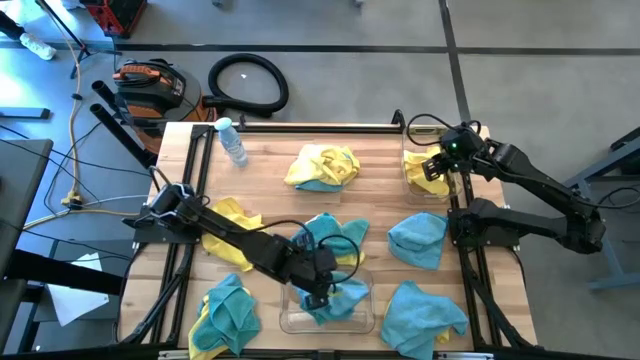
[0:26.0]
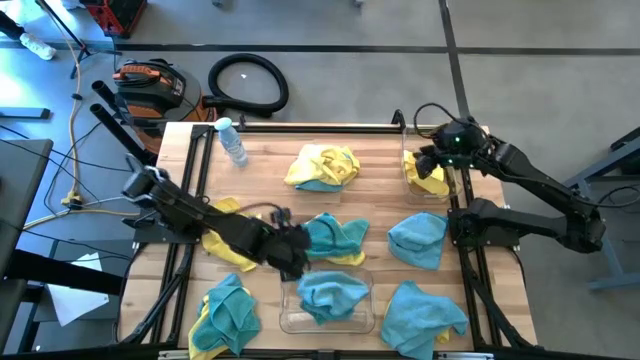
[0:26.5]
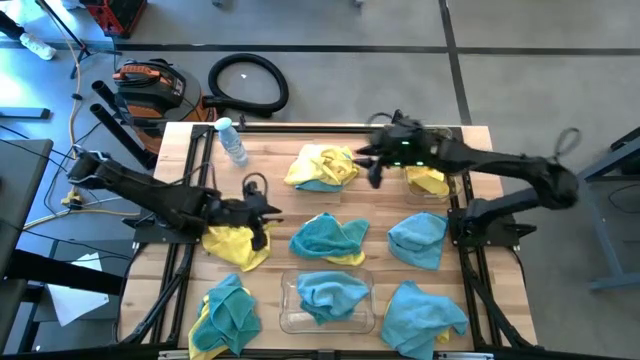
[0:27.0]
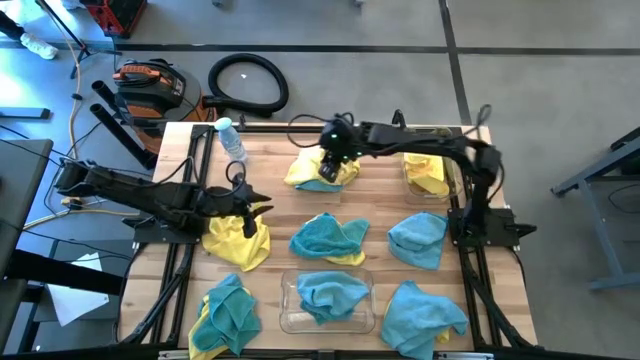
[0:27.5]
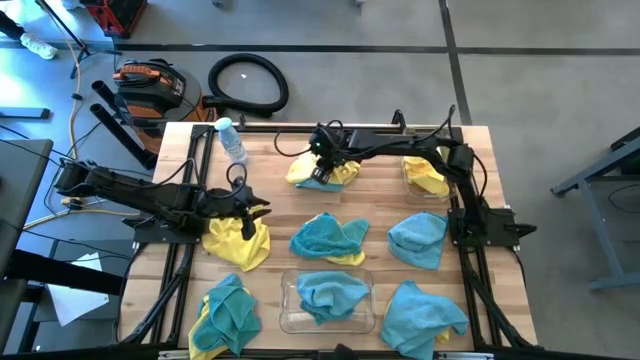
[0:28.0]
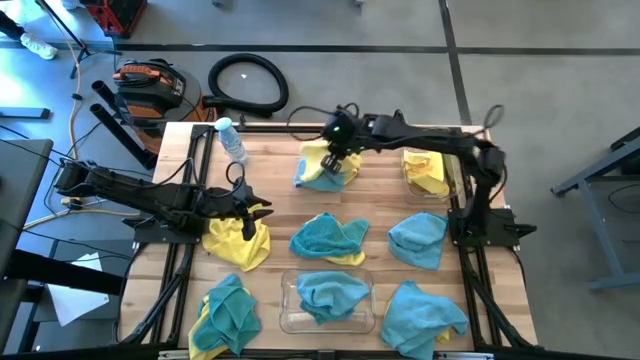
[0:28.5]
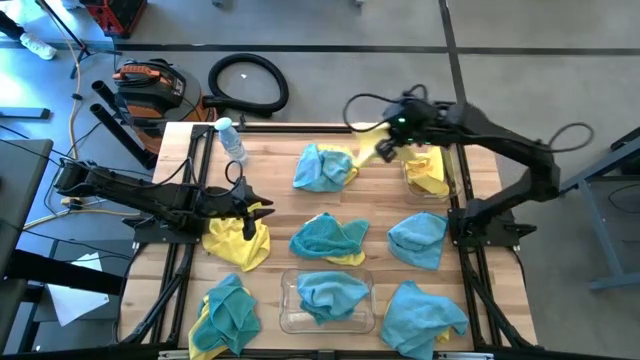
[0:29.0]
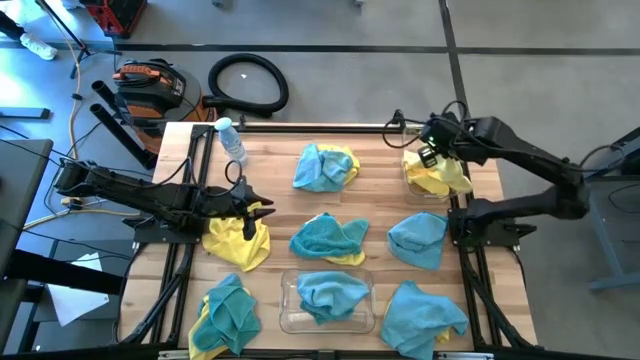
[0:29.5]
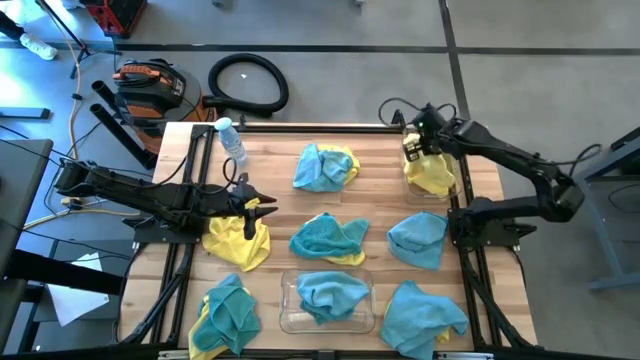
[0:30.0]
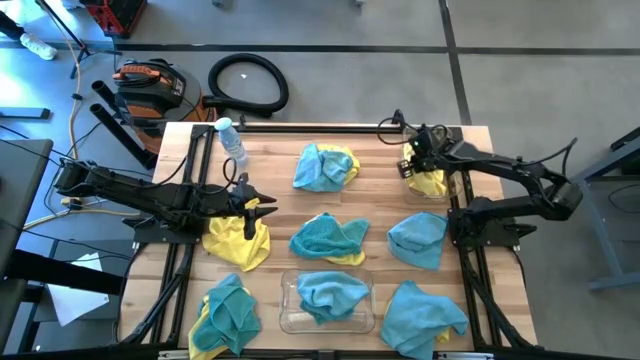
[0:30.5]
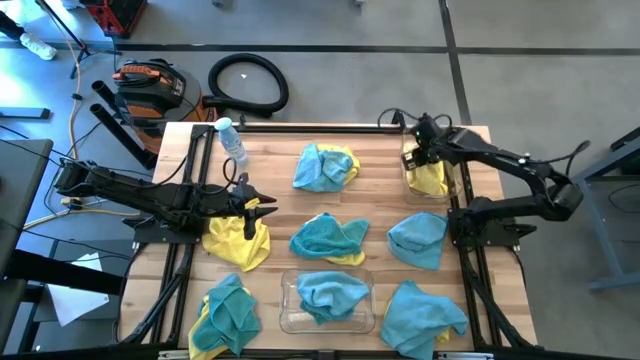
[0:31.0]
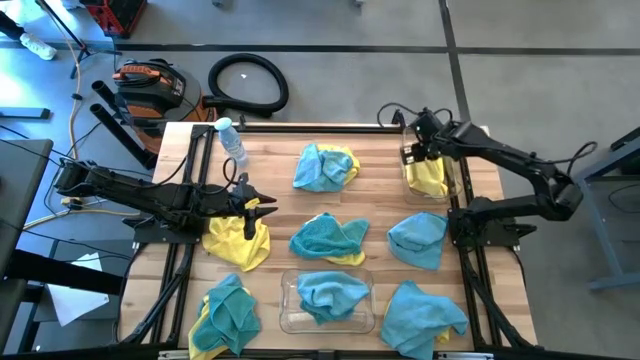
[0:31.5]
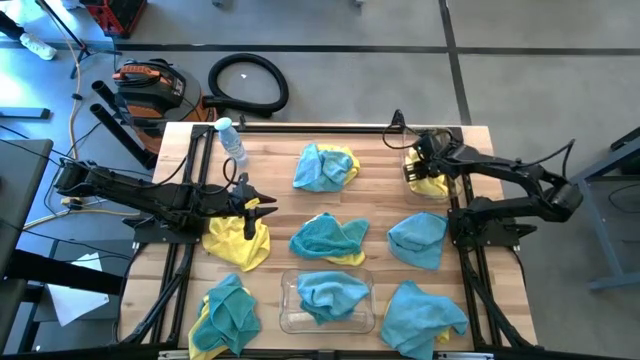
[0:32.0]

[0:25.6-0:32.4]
Task: Sort microfiber towel by color & place in baskets
Put the yellow microfiber towel into the top transparent bin

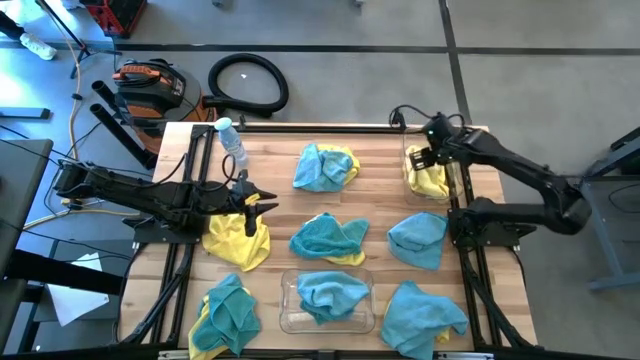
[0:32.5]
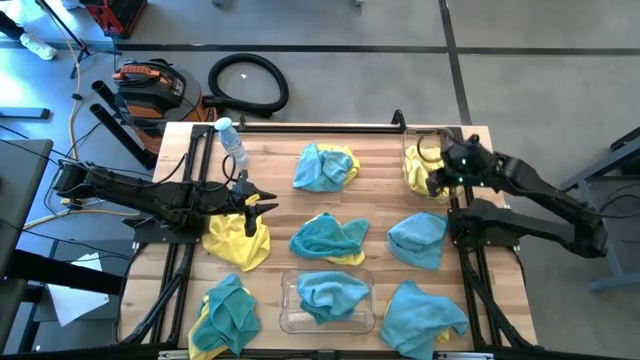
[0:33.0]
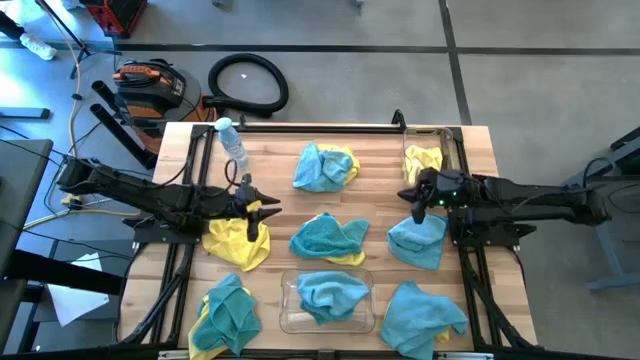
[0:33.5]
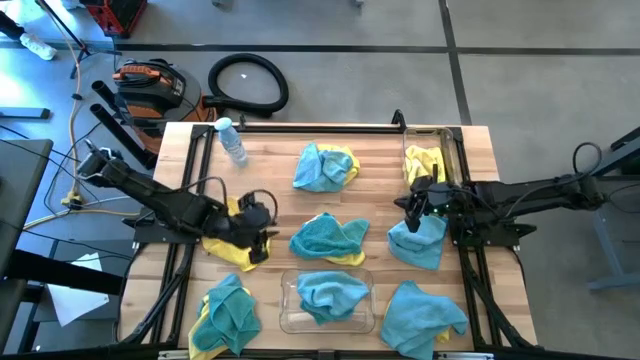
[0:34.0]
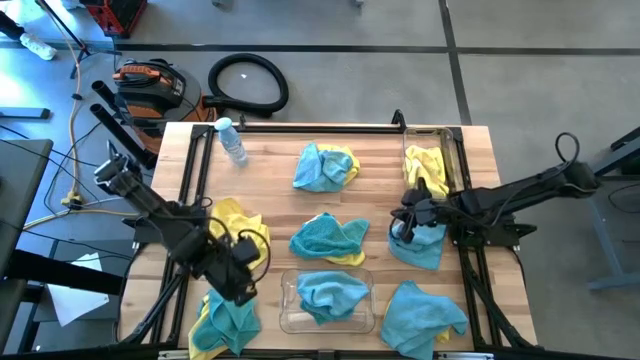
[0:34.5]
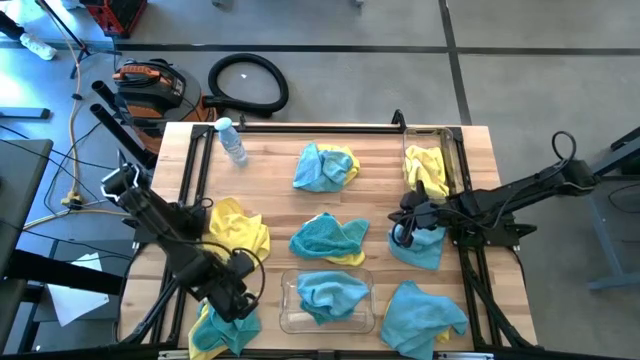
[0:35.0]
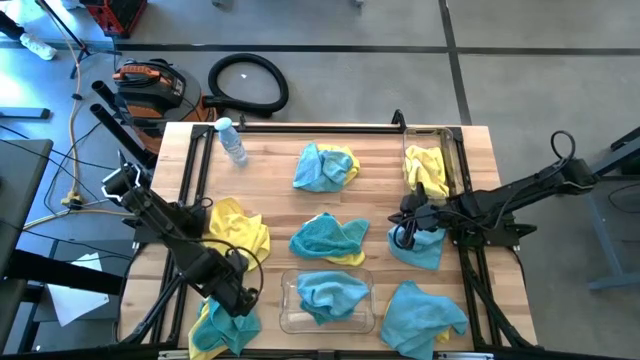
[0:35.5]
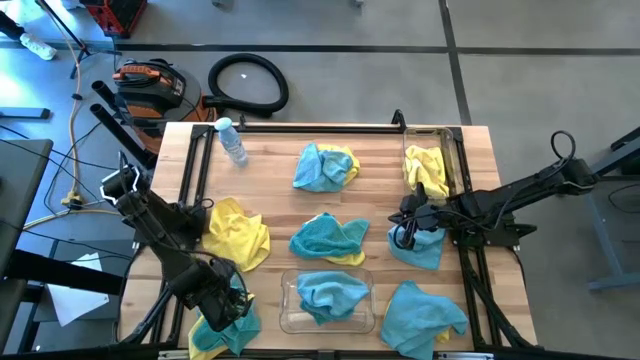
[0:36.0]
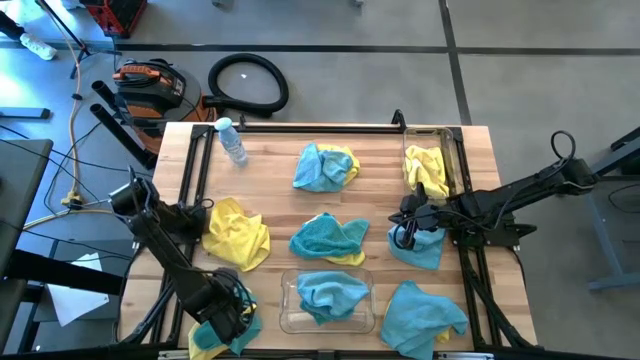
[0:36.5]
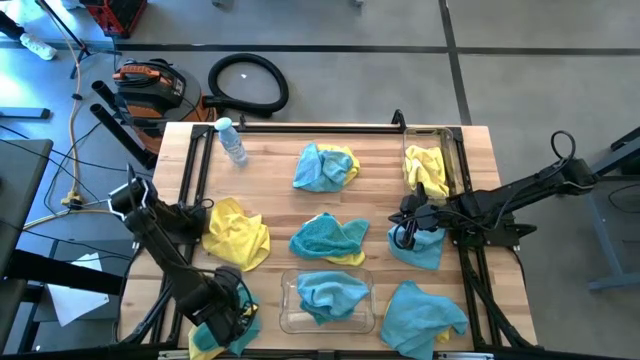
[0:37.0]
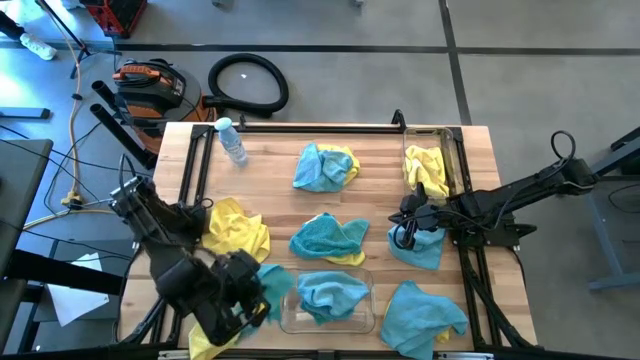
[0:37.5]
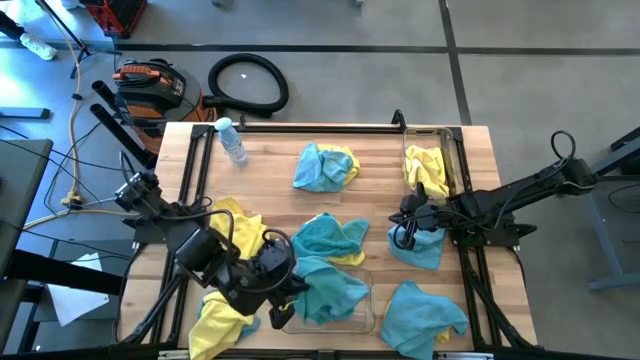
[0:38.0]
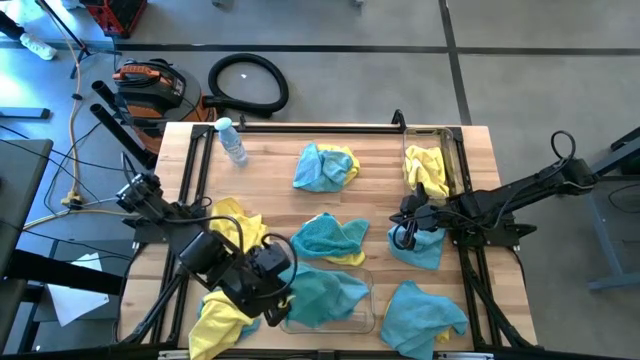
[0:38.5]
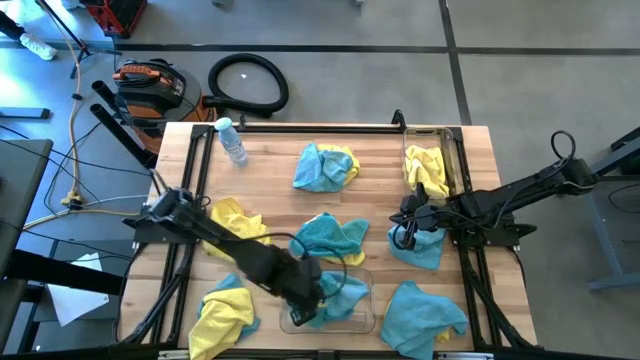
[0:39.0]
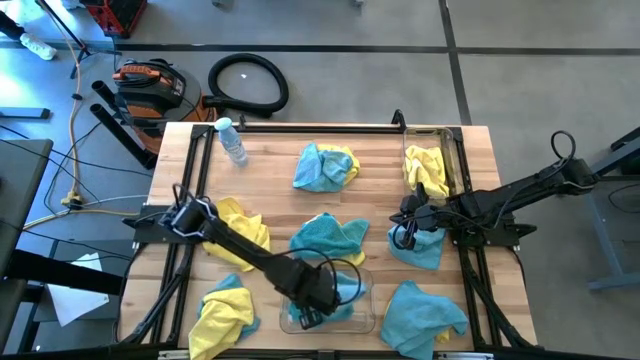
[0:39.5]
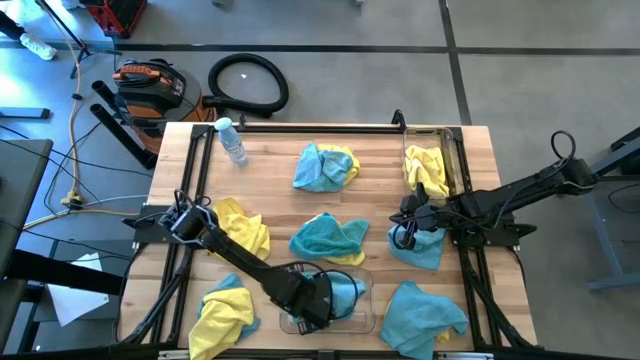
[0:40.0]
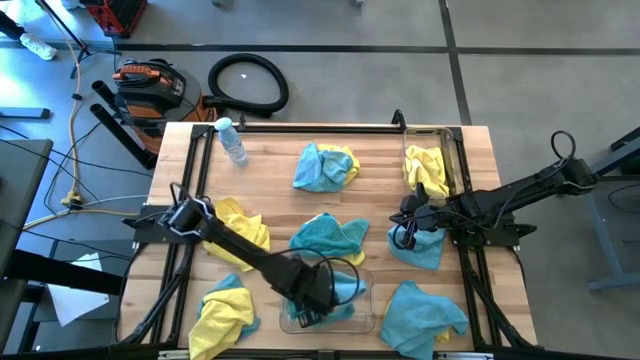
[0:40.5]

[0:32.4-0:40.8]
Put the blue microfiber towel into the bottom transparent bin

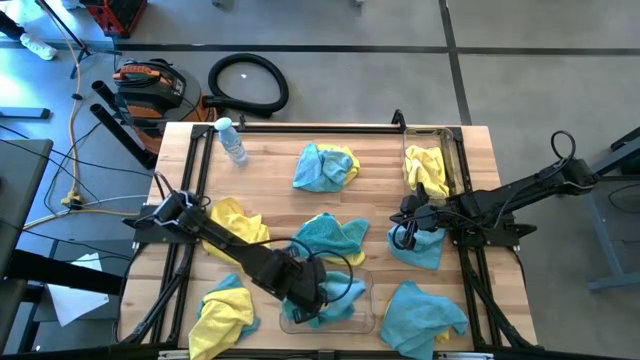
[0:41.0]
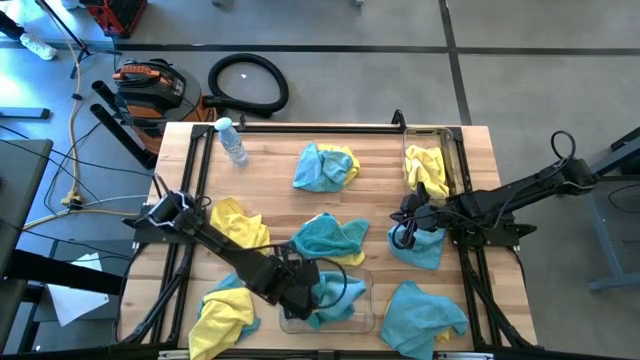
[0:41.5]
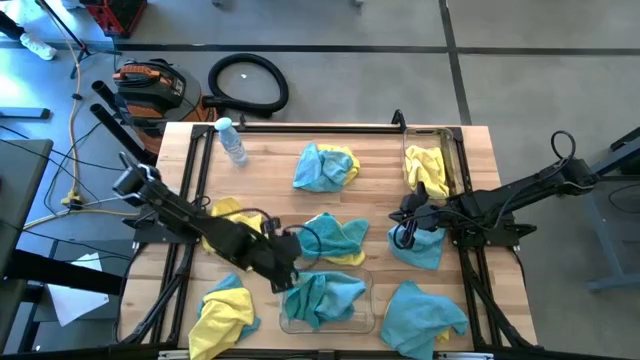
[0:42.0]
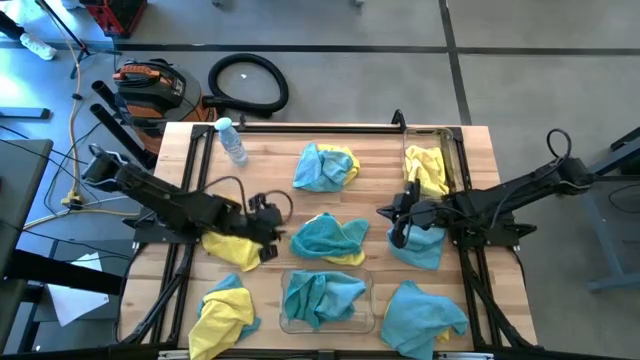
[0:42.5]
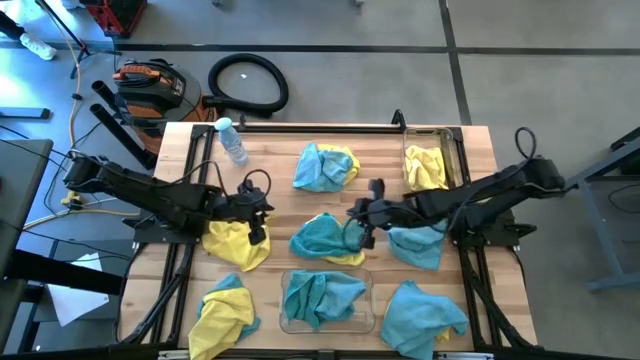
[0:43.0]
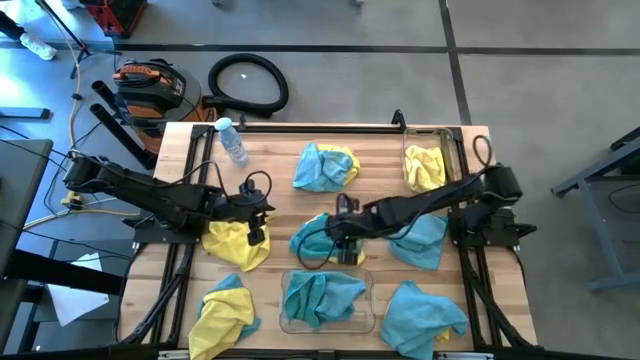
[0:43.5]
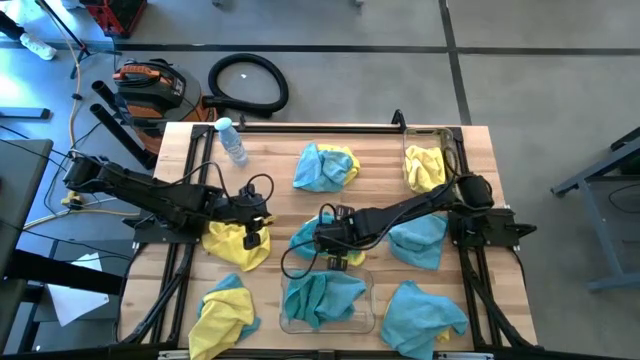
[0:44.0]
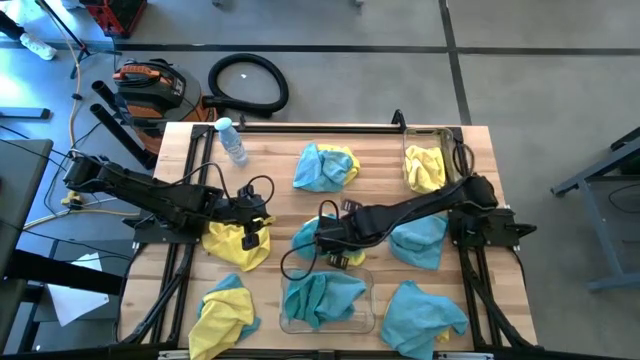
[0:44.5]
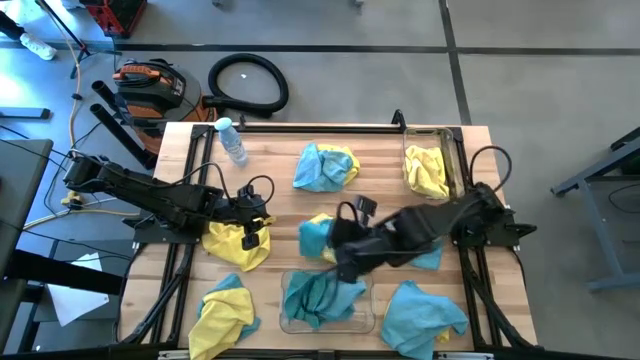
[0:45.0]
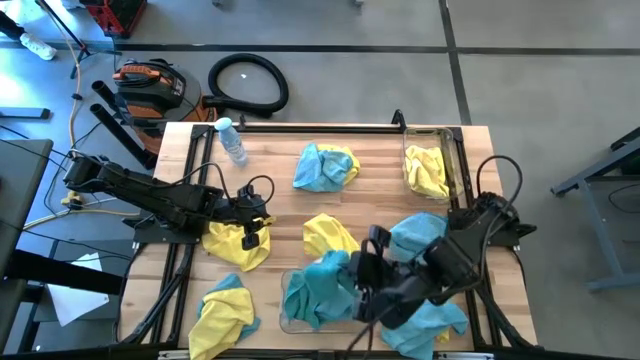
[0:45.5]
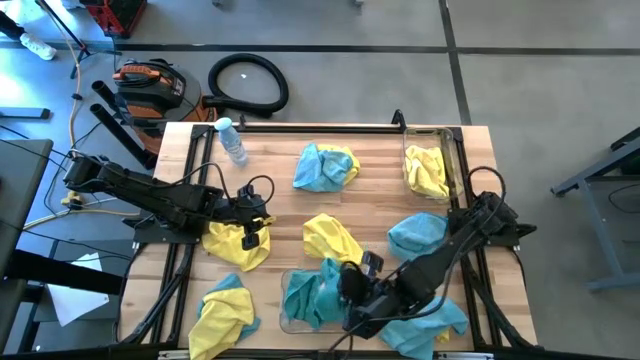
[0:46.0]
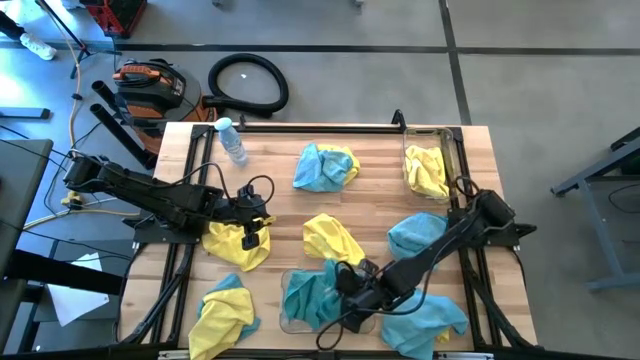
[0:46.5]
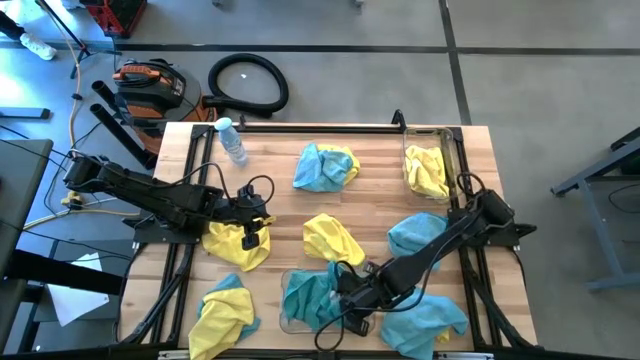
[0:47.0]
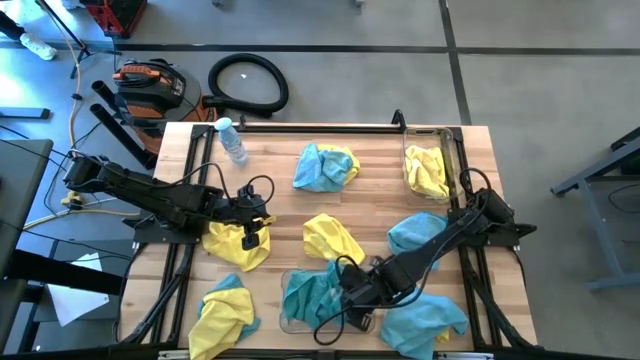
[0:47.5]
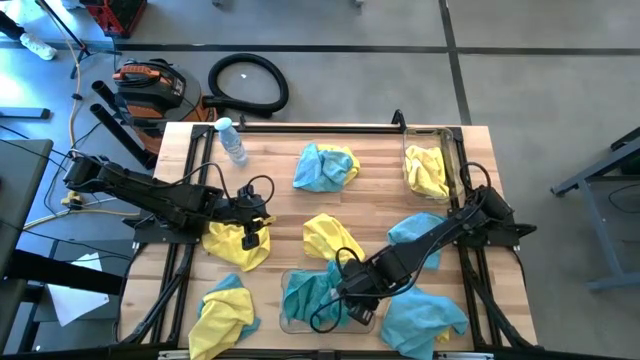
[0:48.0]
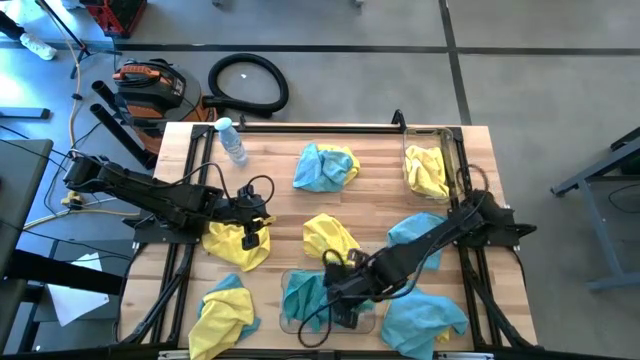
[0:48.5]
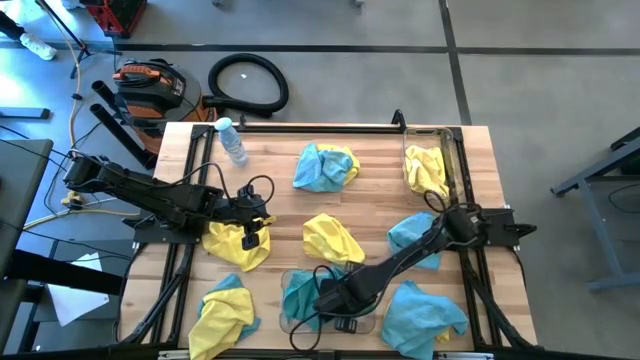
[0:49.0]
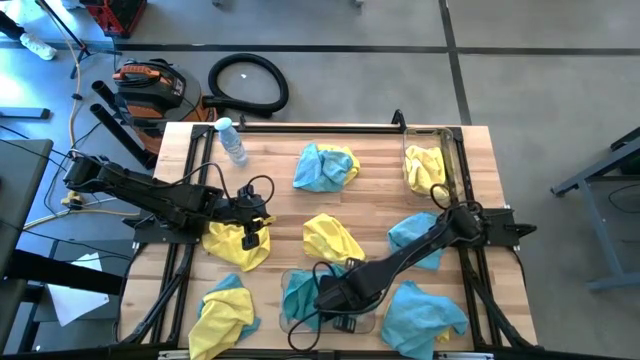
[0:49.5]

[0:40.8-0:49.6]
Put the blue microfiber towel into the bottom transparent bin
